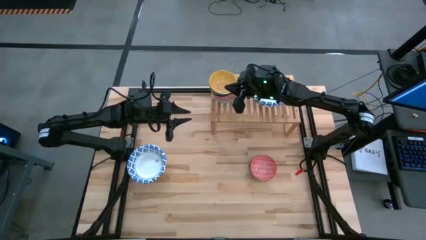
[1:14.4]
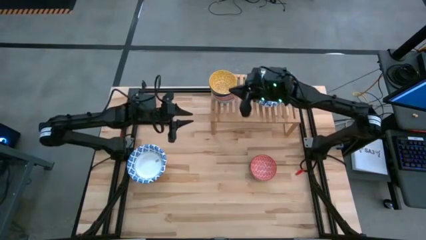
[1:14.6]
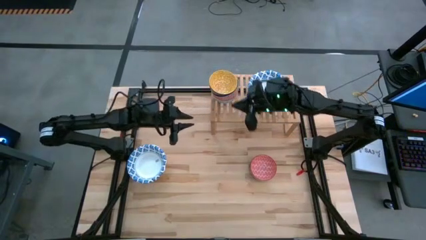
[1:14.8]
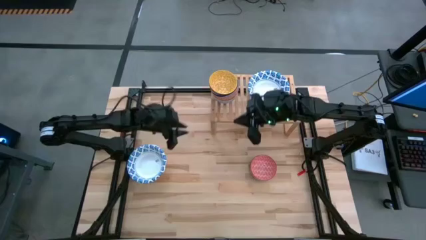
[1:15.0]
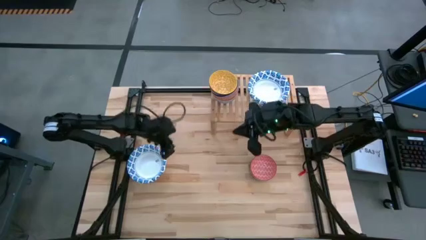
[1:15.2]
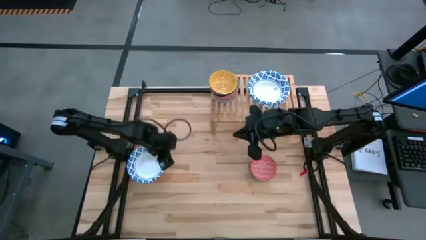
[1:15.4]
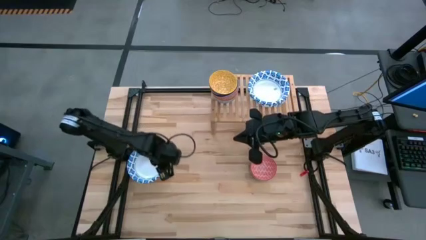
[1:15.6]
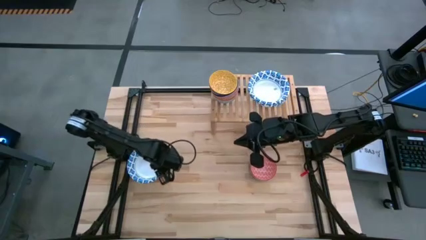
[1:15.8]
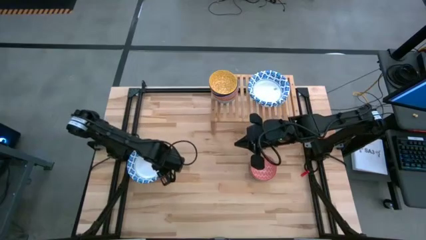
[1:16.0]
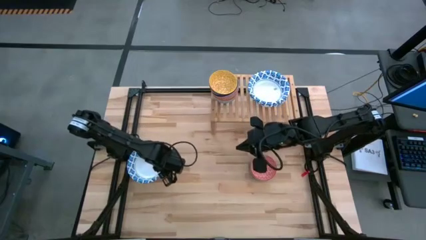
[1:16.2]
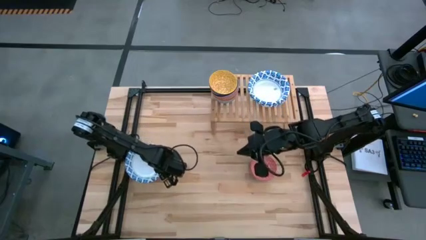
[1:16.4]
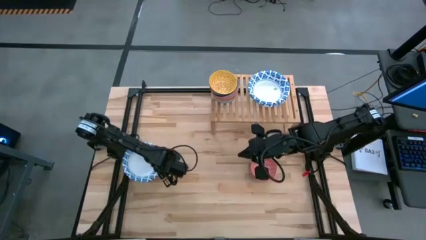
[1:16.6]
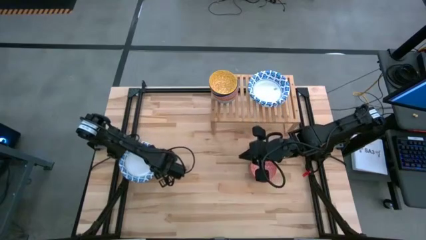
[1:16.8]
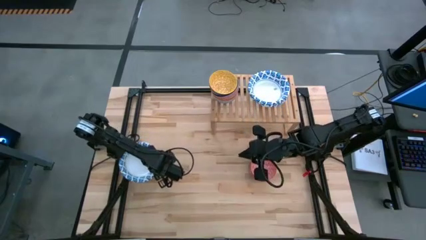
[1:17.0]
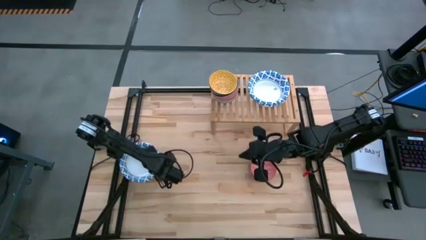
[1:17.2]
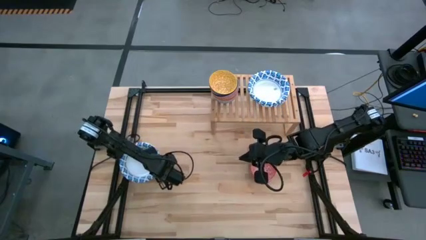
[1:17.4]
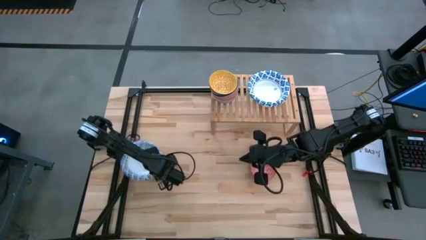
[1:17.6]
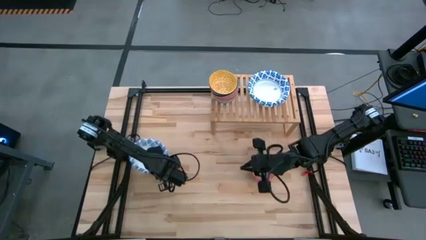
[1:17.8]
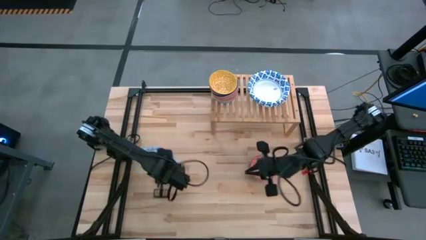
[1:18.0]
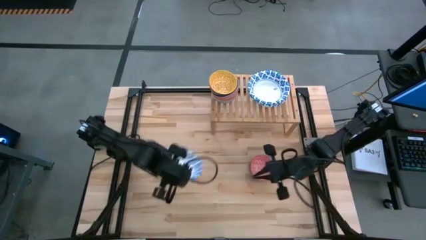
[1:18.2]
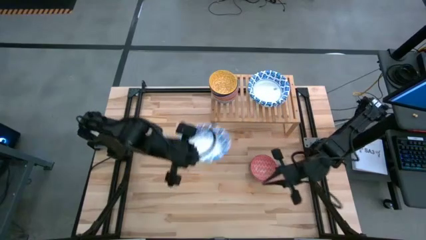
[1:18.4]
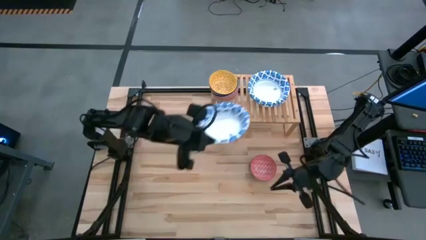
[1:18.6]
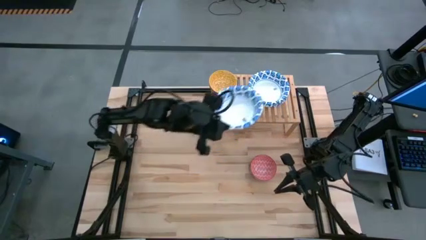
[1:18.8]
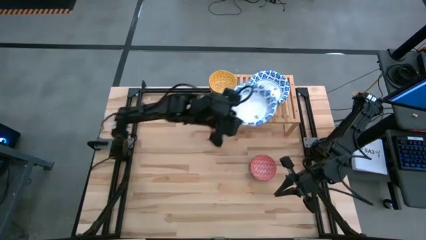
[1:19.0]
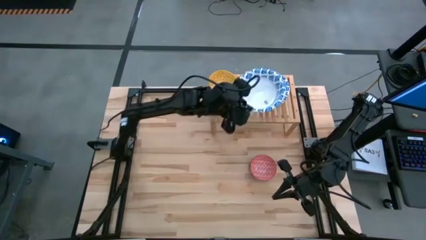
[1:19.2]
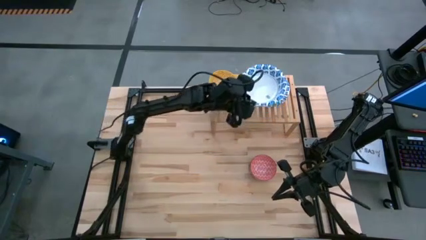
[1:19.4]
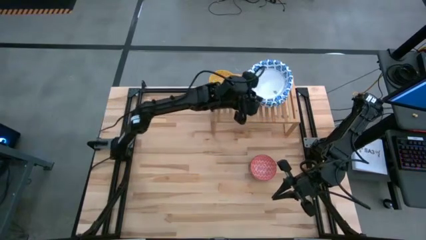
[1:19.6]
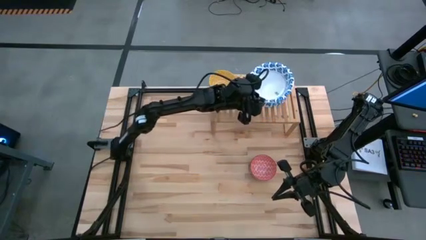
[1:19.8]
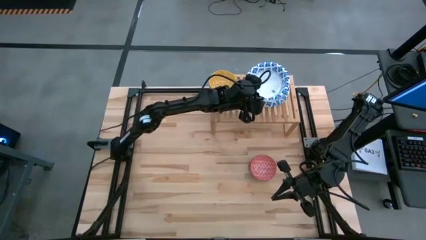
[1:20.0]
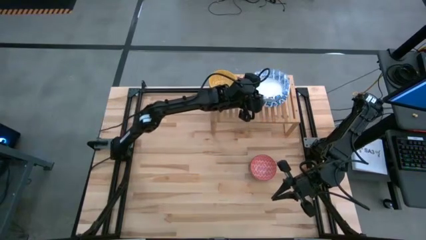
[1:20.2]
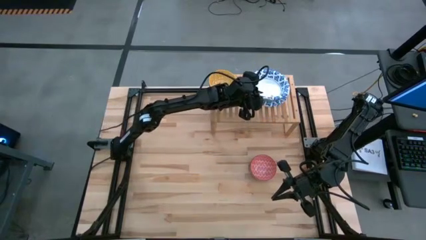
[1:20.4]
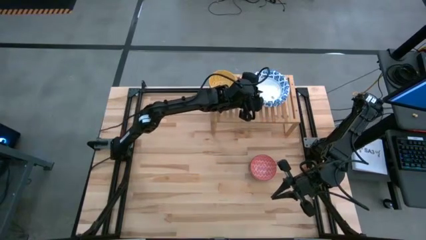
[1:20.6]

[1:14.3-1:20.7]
Task: Place and stack bowls onto a shelf
Stack the white patterned bowl on top of the white patterned bowls on the shelf

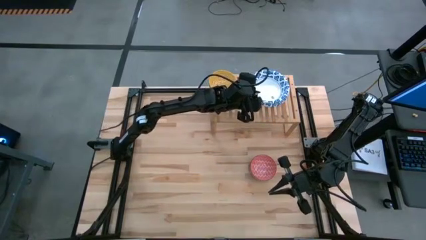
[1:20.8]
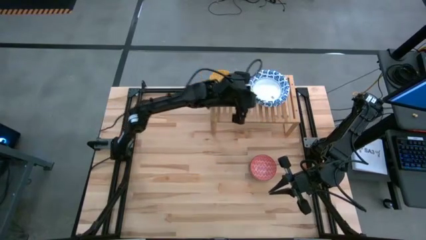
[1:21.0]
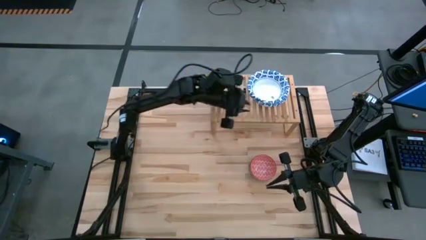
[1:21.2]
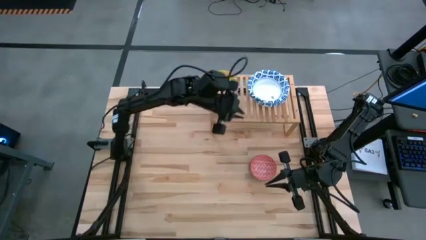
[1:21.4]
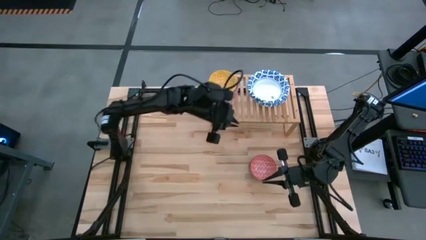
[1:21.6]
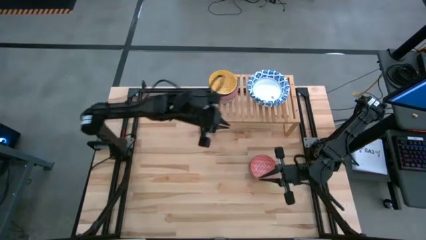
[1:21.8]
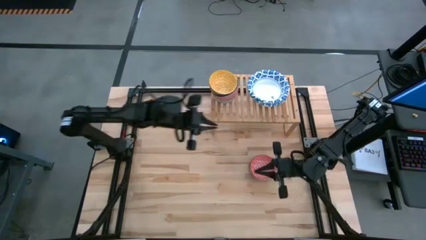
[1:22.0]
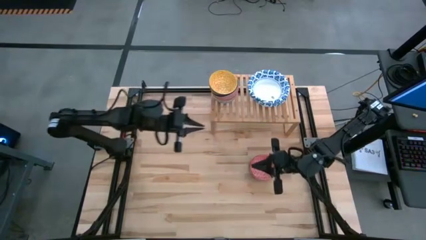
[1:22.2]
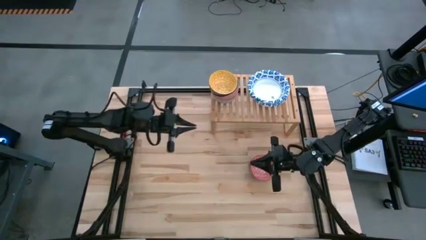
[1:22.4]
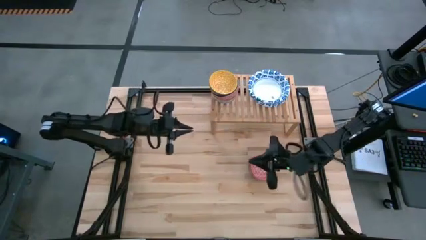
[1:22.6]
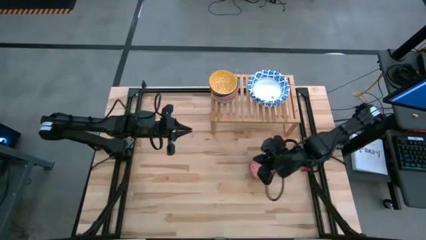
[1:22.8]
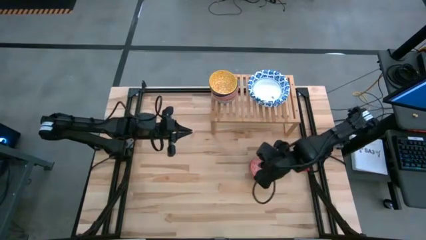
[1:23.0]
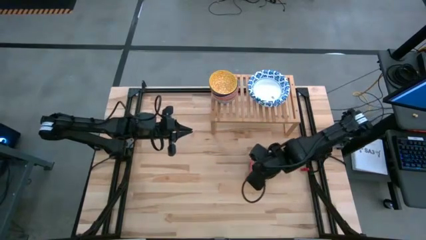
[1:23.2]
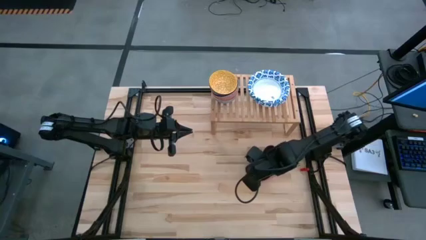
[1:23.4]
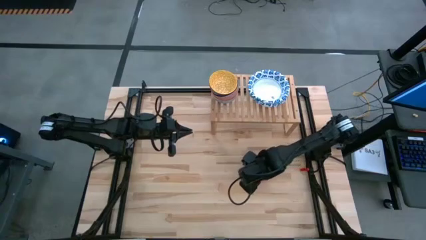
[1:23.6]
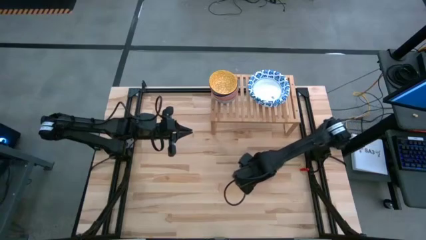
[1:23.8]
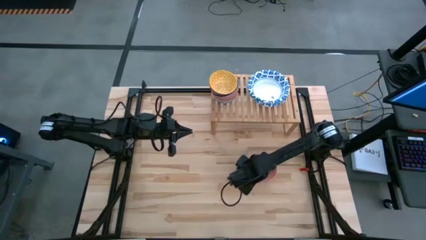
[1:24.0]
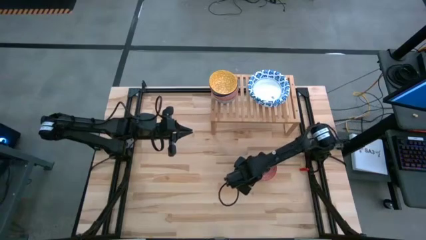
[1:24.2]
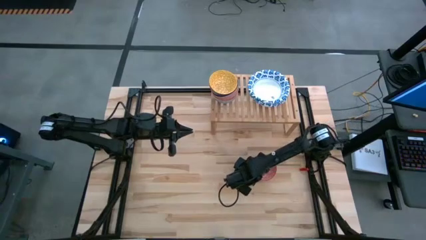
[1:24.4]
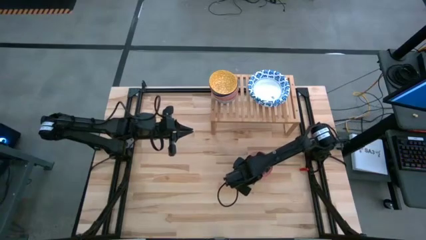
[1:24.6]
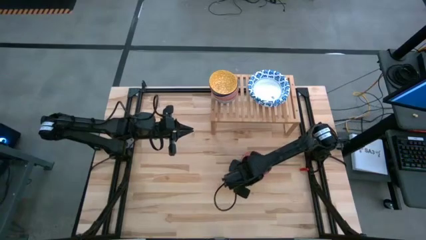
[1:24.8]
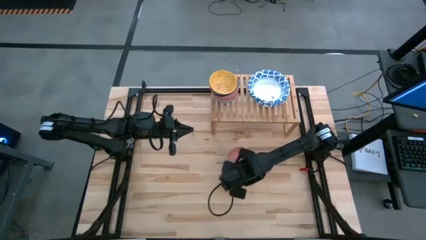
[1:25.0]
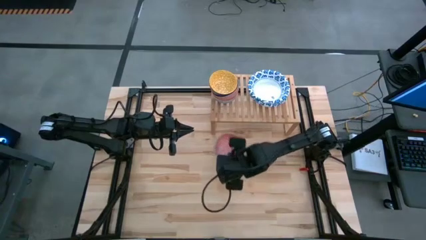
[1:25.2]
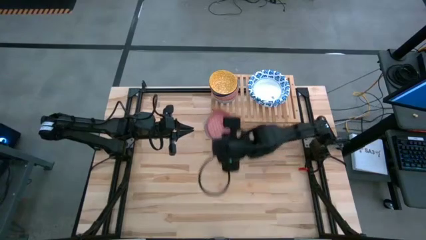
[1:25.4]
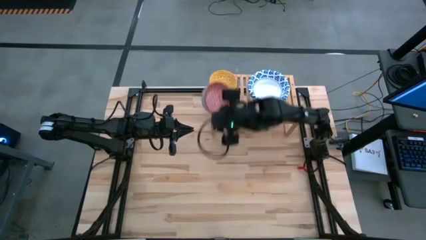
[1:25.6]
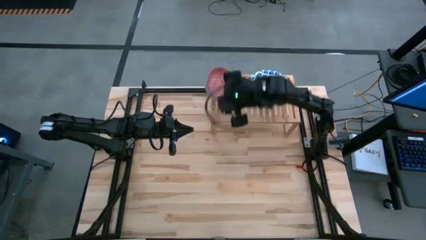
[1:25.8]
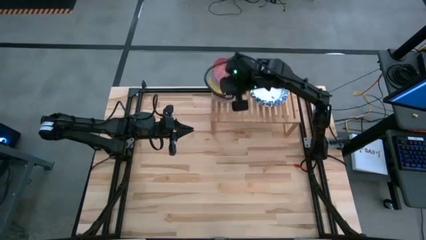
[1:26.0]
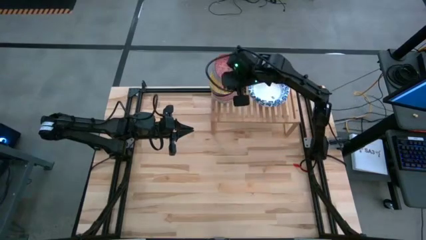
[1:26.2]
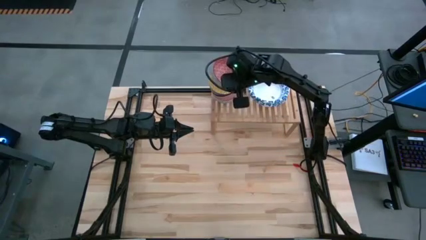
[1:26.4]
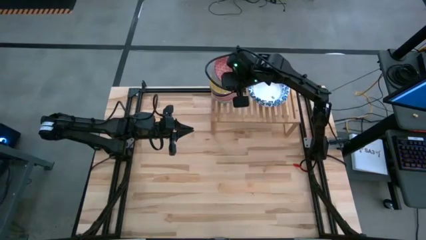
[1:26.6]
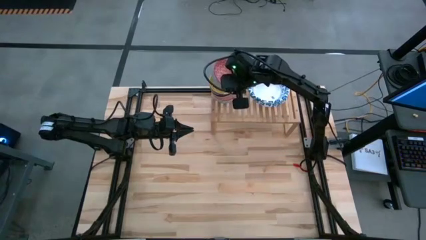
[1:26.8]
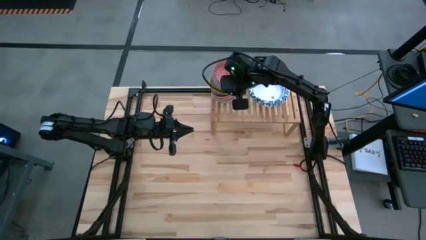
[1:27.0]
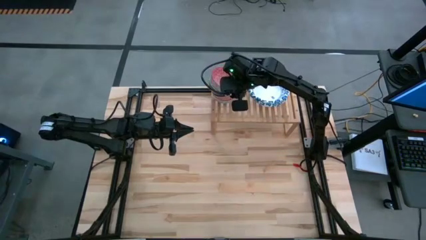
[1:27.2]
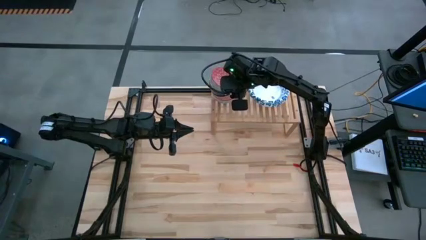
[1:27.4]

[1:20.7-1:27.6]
Stack the red patterned bowl on top of the yellow patterned bowl on the shelf

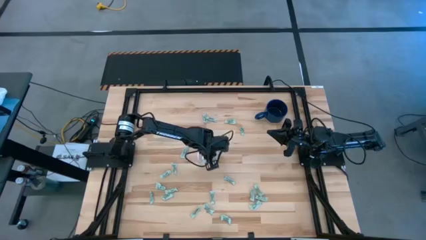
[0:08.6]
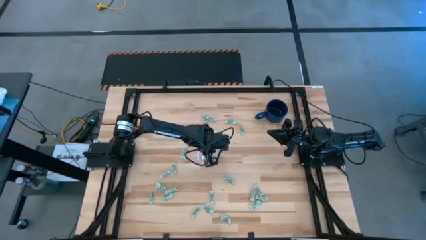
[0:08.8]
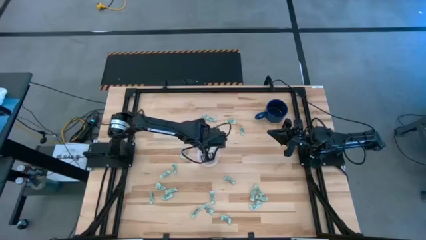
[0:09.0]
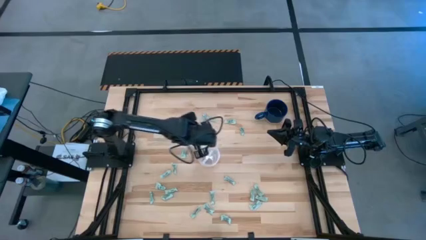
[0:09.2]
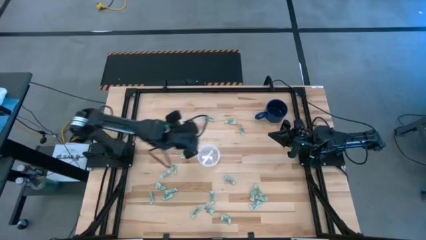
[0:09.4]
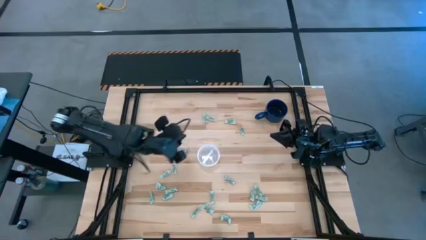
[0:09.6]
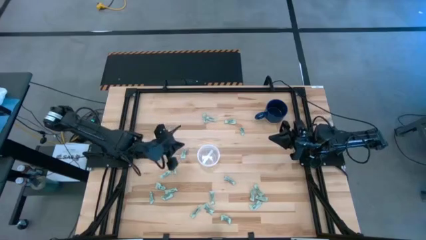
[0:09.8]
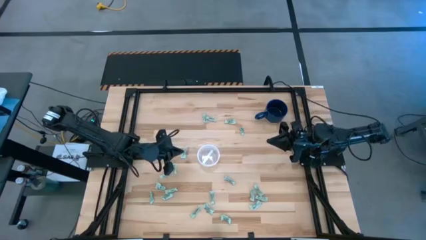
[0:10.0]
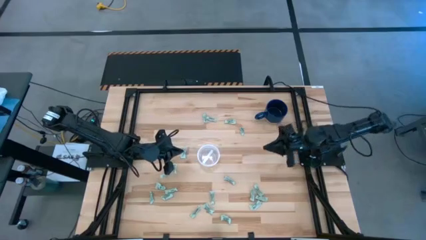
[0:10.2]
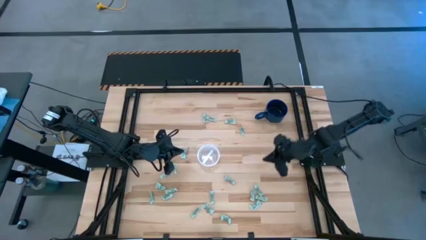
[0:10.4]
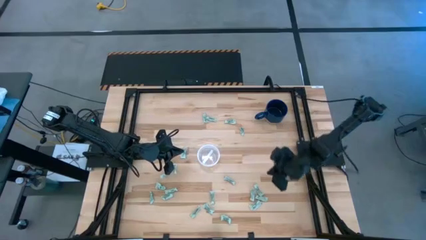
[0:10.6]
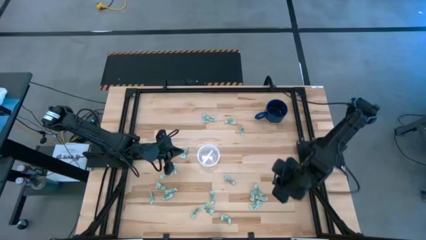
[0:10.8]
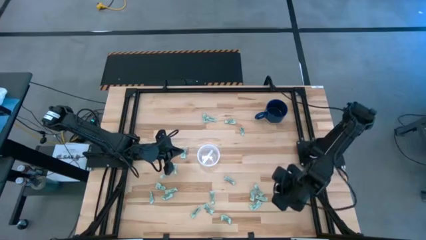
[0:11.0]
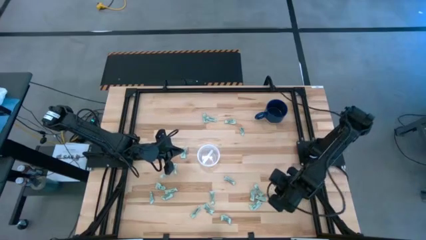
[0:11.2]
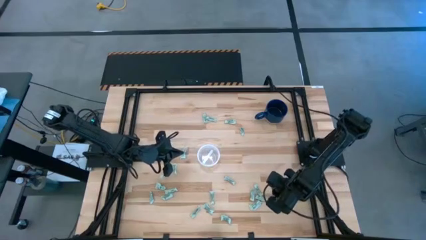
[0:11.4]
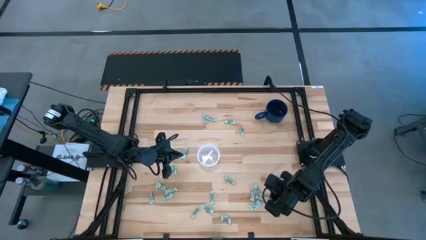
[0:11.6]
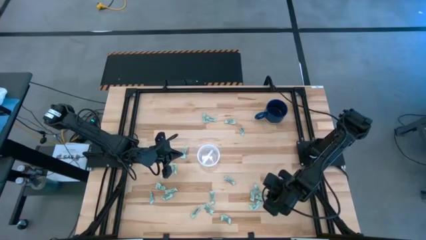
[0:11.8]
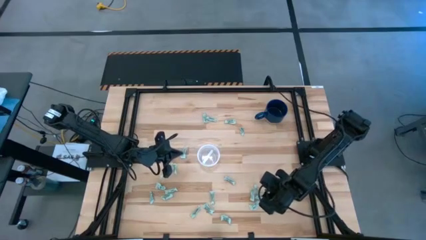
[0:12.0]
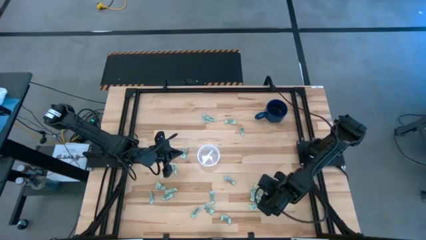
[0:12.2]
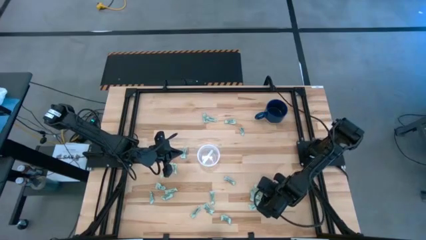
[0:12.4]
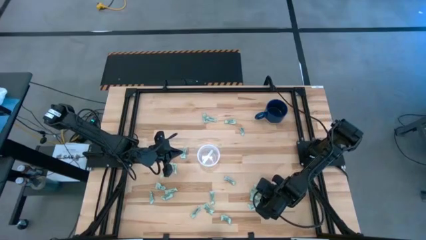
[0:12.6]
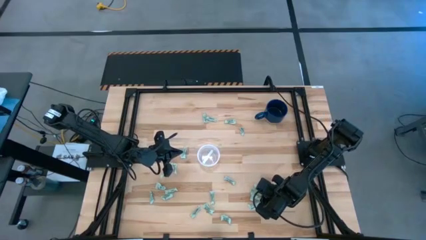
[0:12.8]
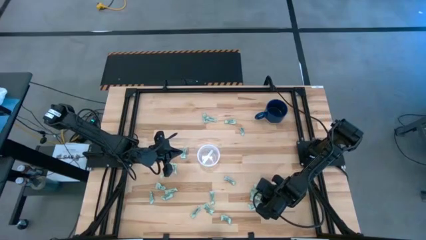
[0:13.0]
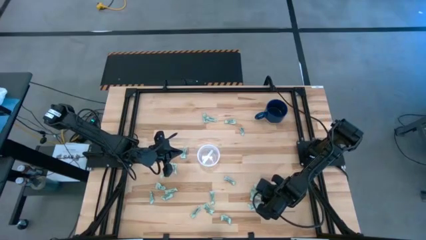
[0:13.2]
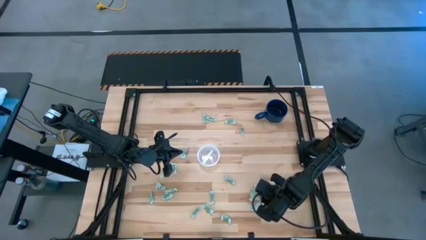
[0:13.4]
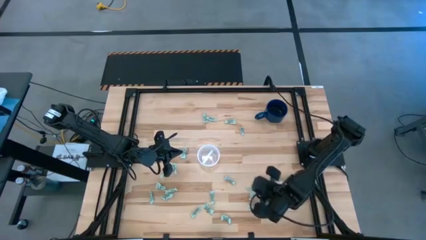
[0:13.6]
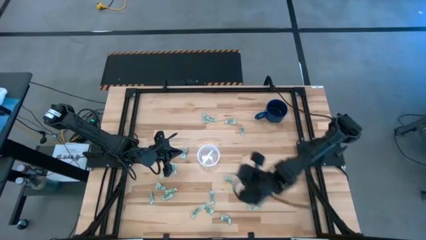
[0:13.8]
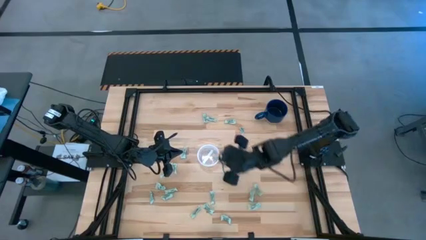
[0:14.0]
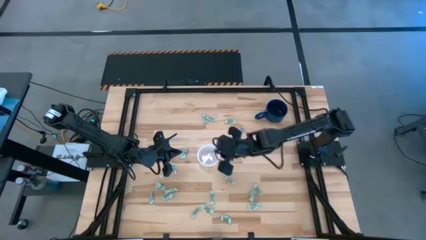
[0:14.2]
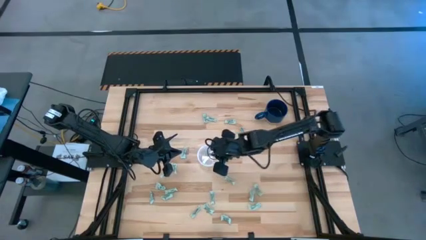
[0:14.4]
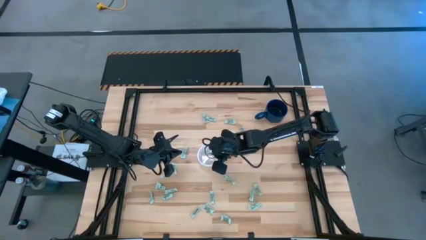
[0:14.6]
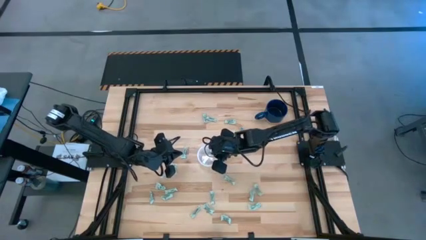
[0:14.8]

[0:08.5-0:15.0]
Task: Pick and place items into bin
Put the stevia packet into the transparent bin
